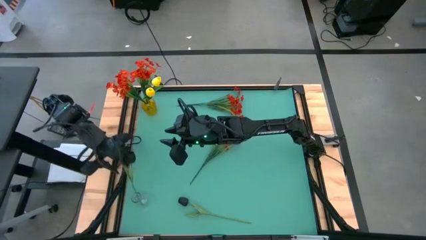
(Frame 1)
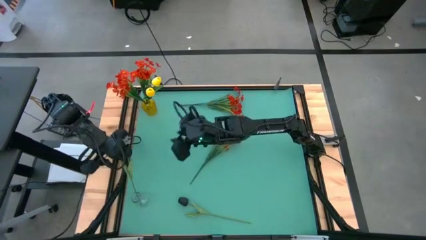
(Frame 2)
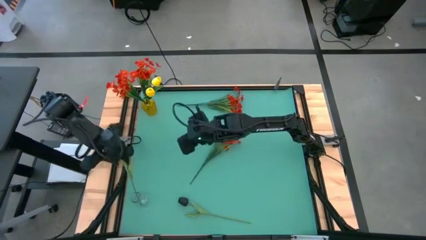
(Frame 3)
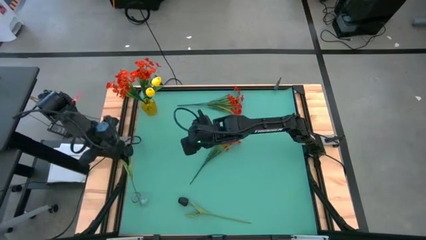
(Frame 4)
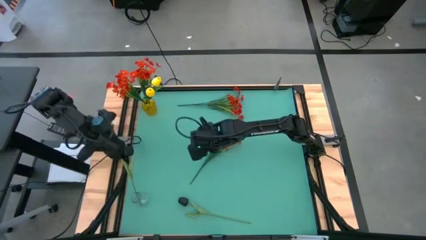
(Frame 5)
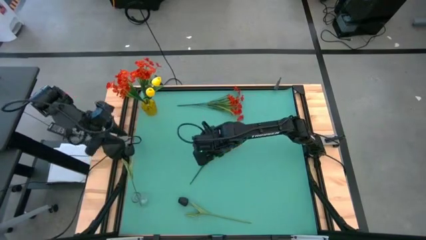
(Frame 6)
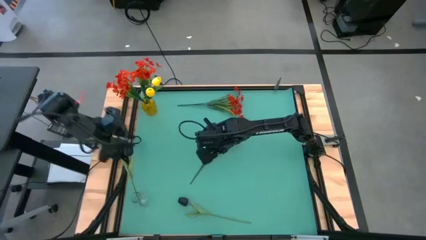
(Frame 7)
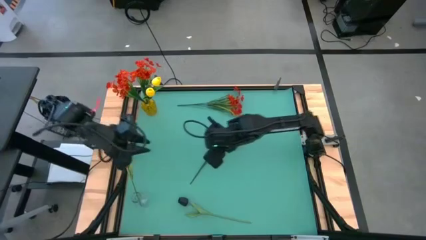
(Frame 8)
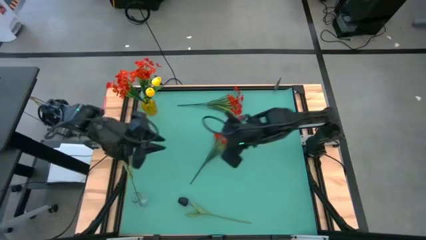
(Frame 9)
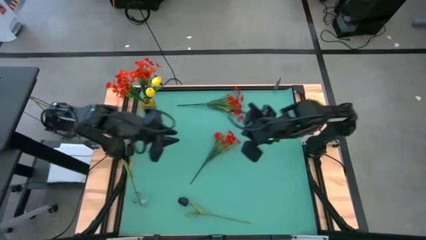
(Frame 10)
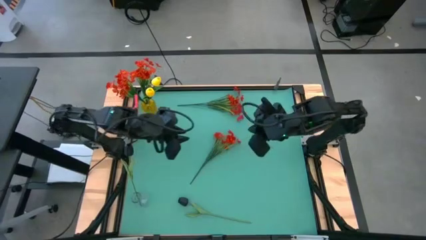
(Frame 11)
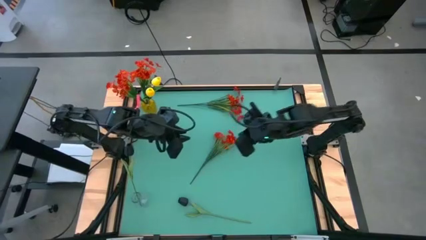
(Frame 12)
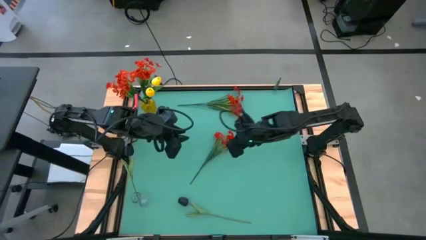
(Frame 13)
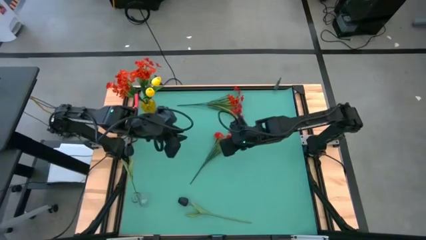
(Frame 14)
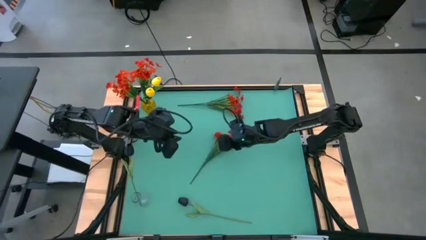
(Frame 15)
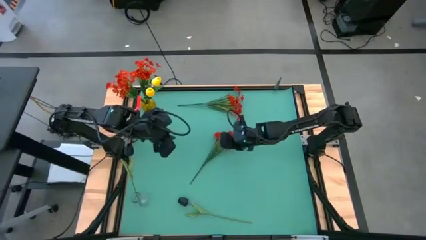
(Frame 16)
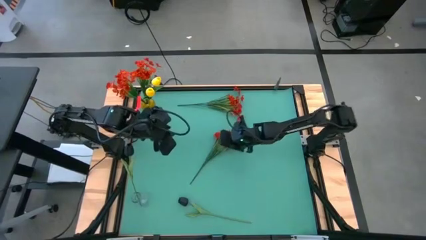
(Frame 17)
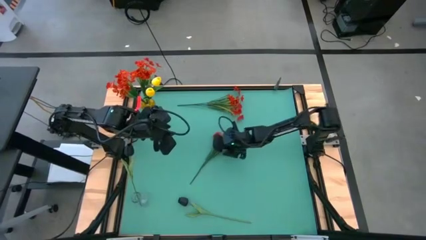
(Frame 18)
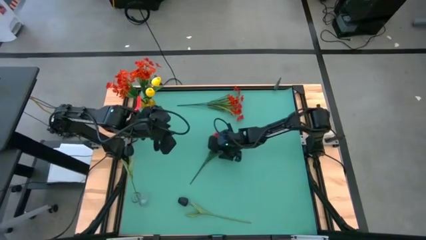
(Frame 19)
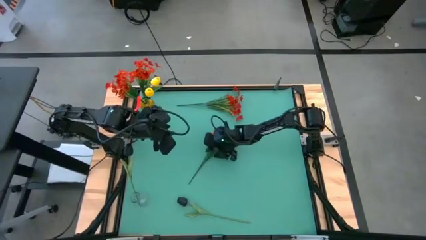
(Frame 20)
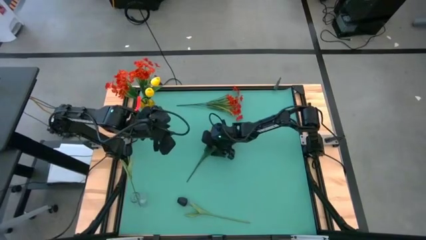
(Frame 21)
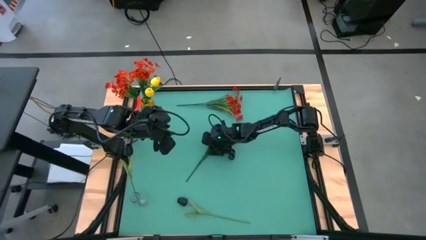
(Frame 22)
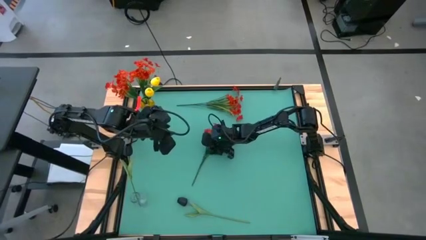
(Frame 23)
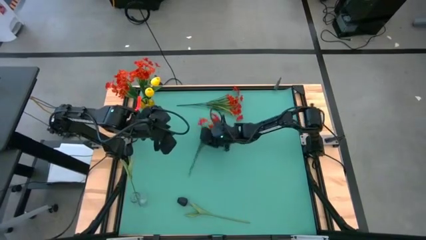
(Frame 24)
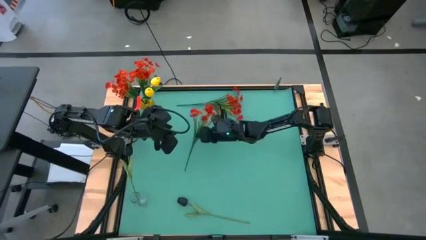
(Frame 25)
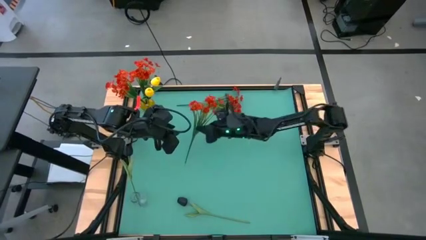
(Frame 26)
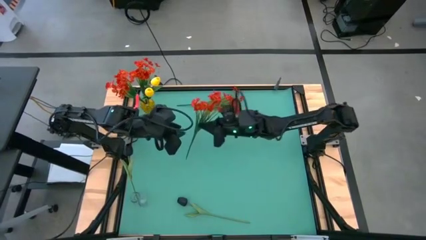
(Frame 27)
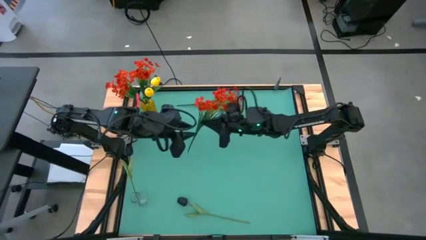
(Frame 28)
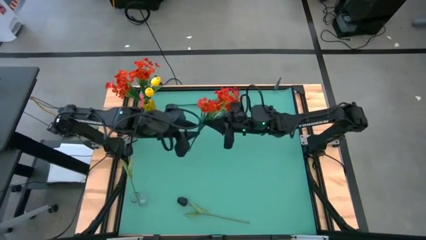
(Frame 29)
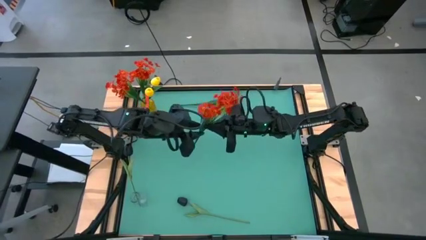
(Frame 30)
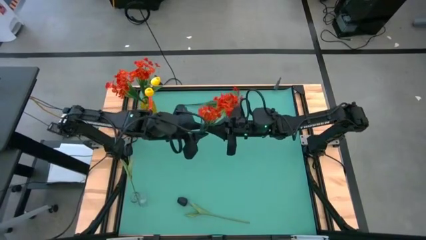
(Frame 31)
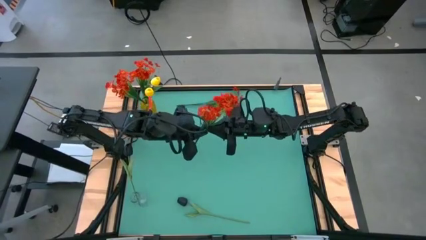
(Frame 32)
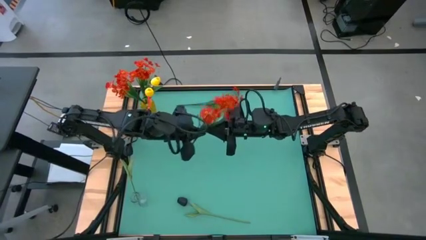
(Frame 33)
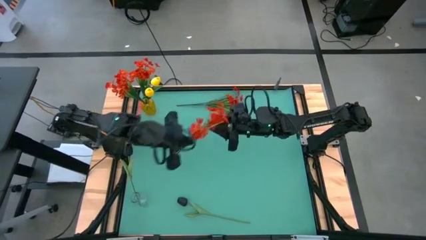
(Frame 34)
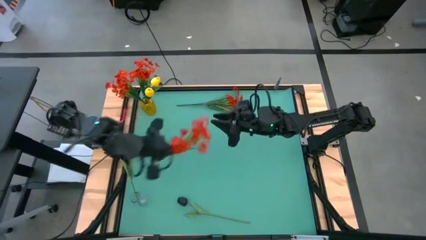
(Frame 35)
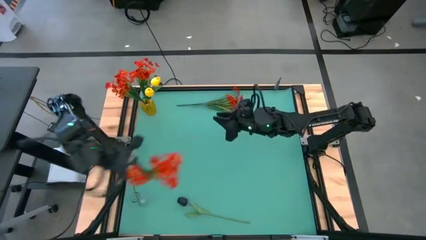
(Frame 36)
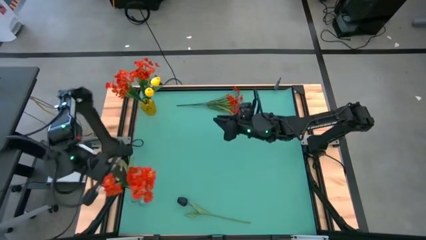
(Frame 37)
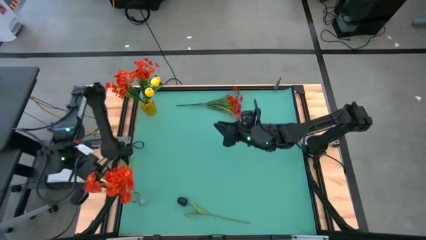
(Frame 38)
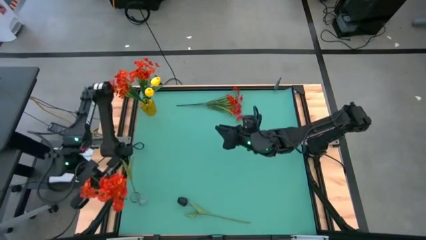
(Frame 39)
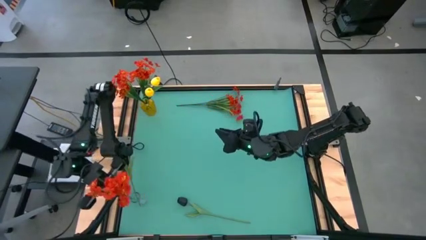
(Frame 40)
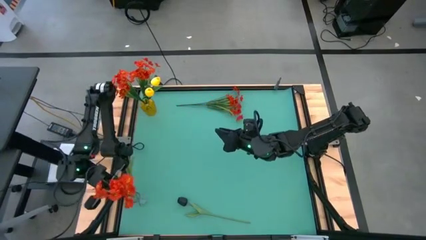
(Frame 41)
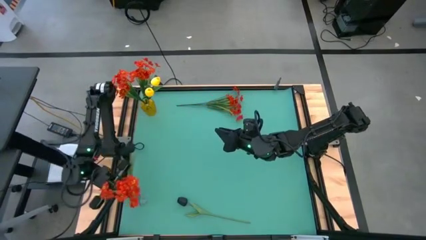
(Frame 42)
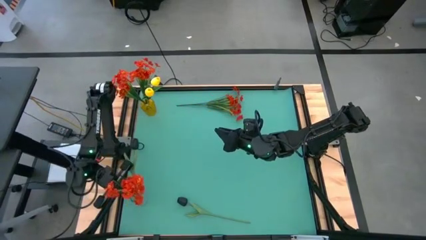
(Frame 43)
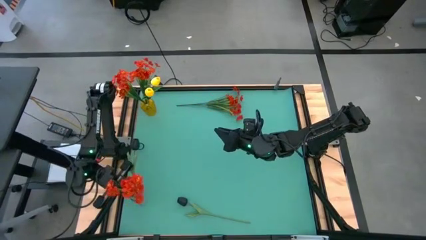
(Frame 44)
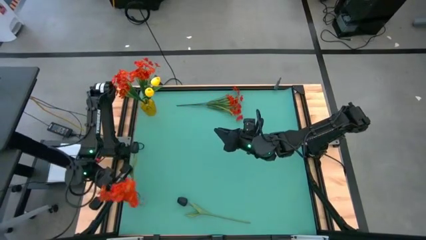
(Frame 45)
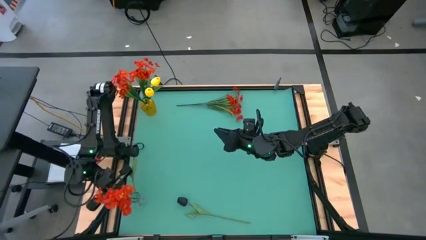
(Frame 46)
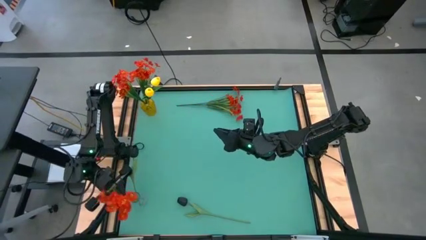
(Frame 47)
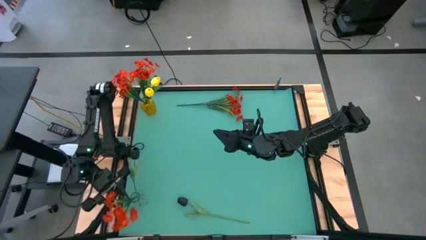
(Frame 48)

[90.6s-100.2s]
Task: Sort flowers into vase by color
Put the orange flowers into the transparent vase

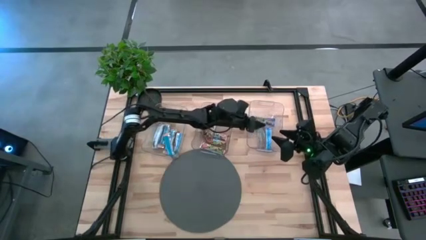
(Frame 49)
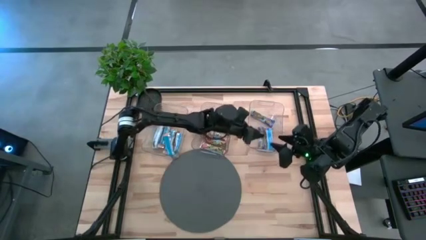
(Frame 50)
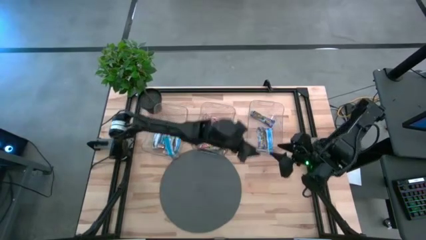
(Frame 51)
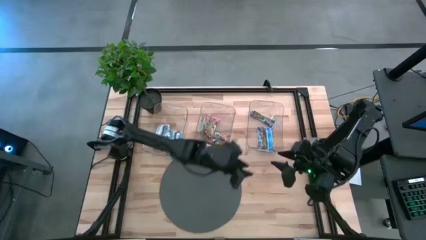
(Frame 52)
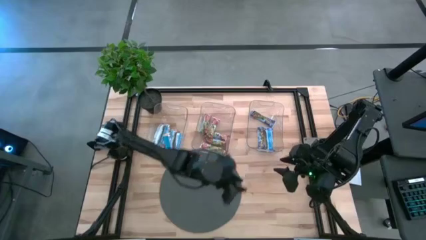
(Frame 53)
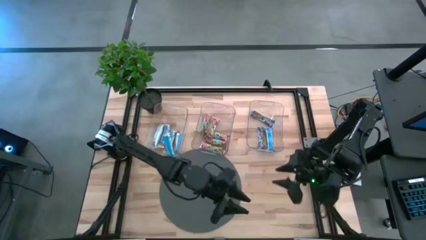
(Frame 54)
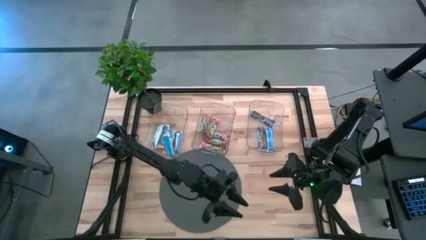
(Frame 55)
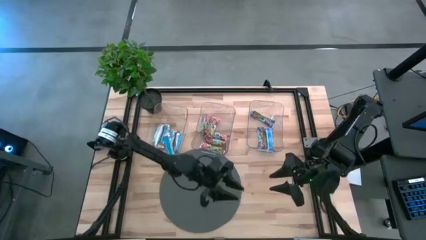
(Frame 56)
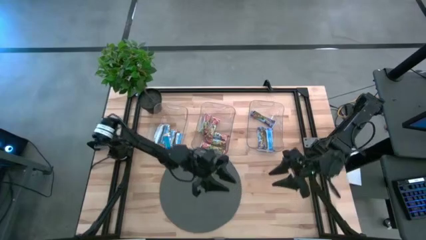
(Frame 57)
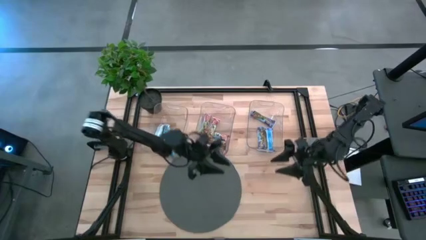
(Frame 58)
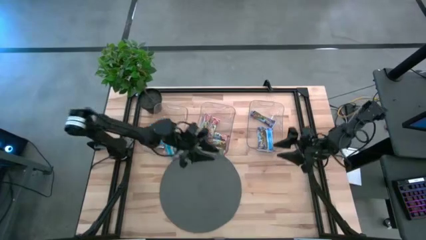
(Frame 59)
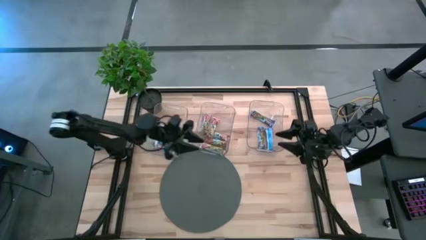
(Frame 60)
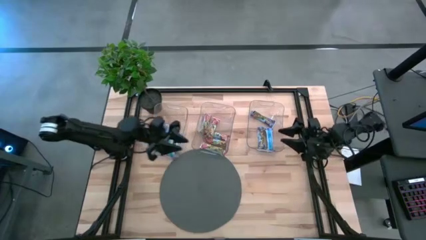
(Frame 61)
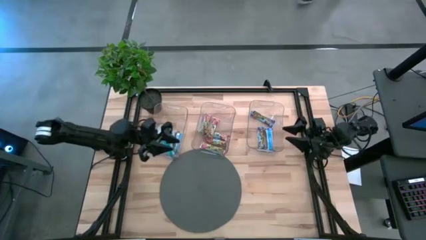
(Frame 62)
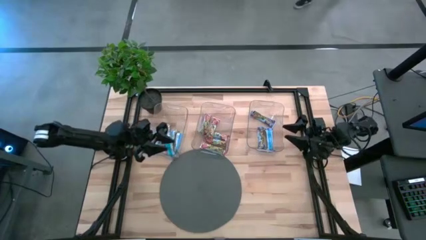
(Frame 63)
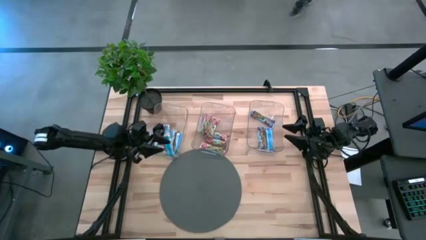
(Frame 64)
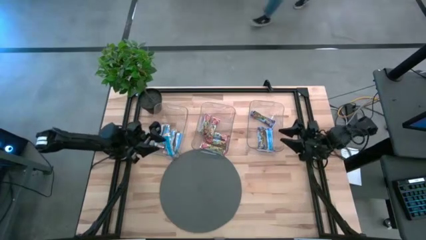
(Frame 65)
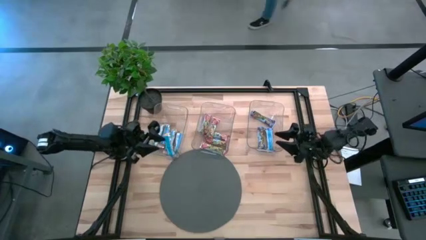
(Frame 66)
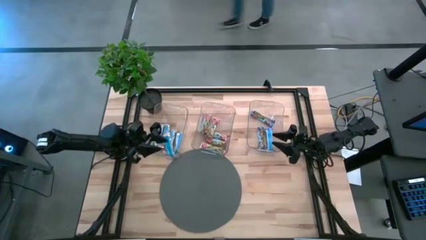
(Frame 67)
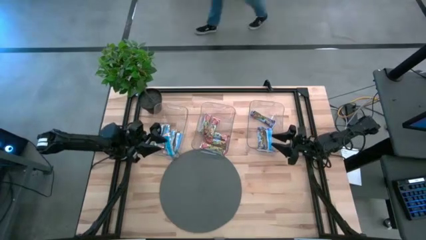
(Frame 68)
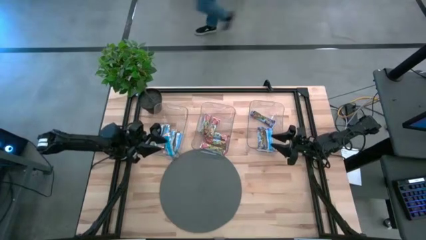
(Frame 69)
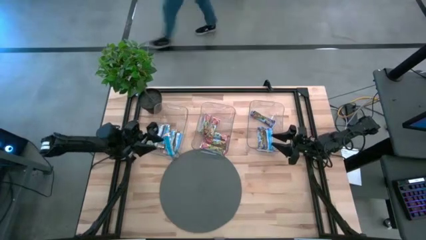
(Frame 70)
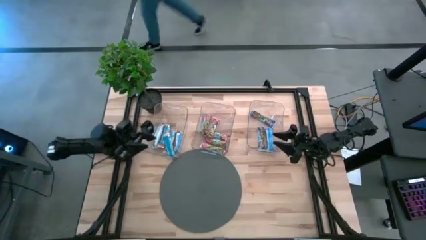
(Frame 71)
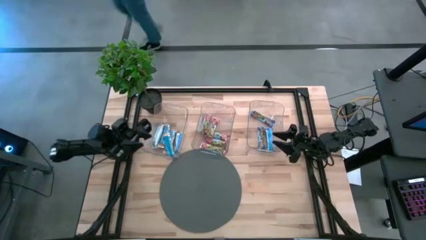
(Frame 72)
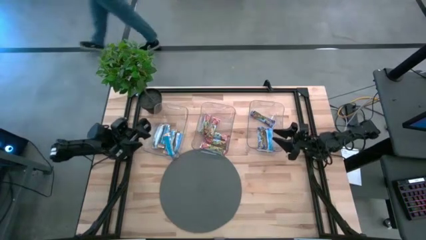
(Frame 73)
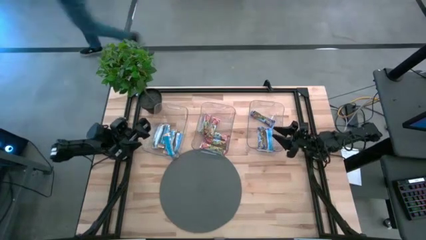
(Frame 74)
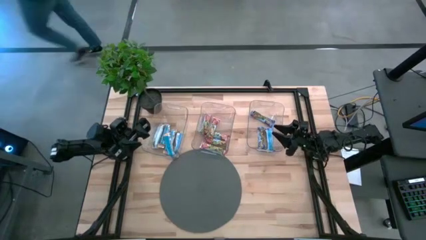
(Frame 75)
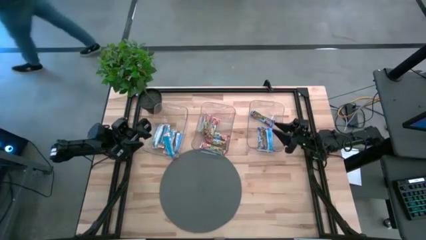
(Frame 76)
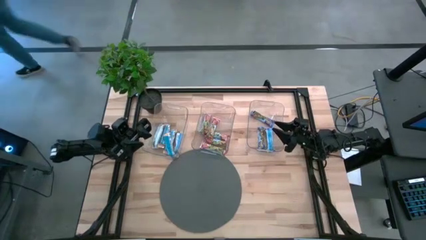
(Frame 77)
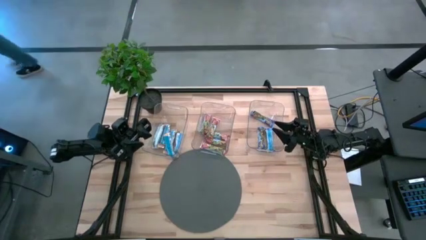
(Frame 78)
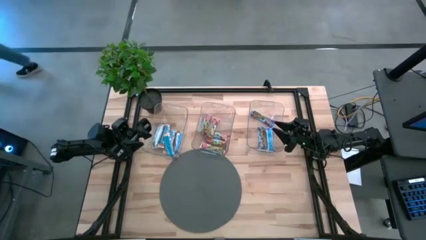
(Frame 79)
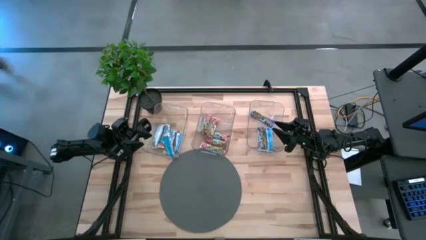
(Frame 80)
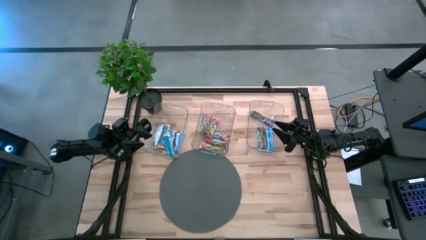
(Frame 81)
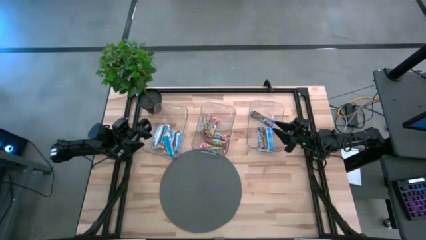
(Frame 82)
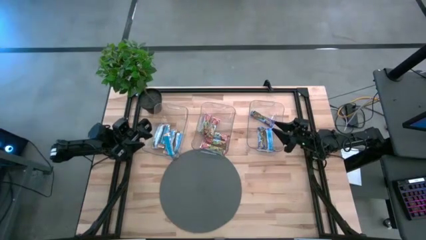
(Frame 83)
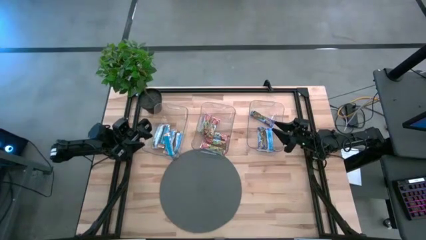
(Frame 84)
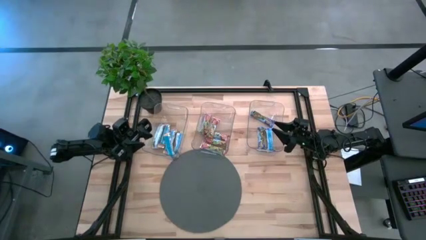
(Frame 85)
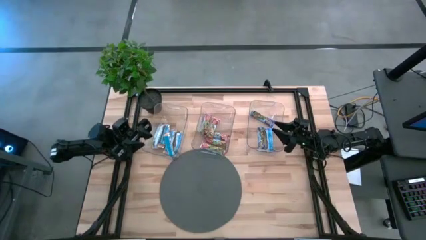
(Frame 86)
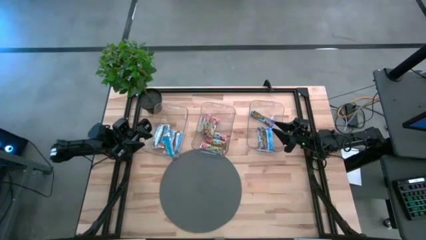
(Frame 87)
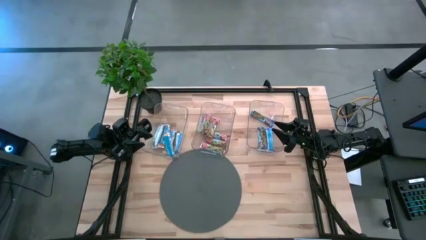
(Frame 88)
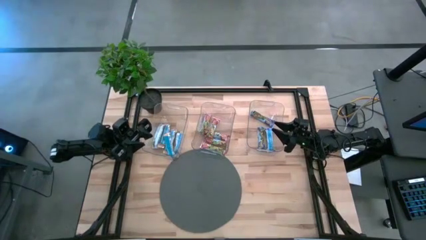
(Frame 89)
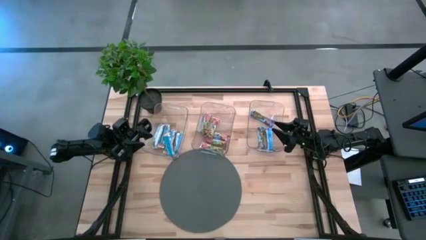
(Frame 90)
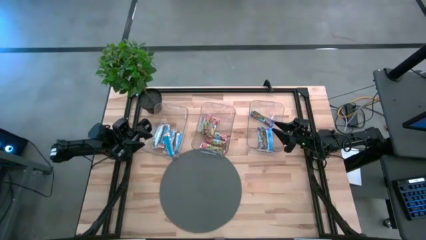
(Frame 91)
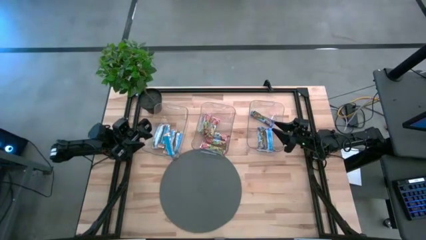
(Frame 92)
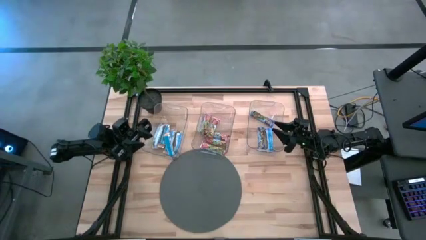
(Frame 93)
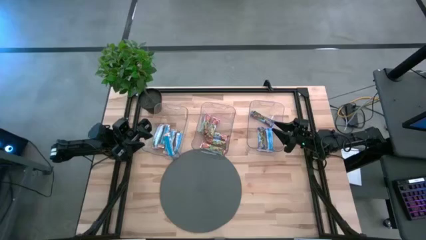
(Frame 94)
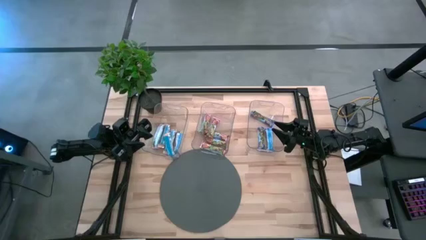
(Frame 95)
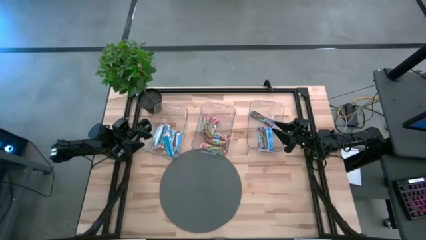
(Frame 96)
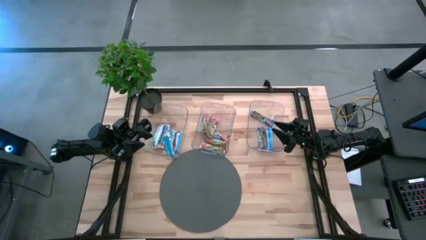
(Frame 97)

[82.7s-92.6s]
Task: Pick and place Granola Bars by type
Return to Home Position
